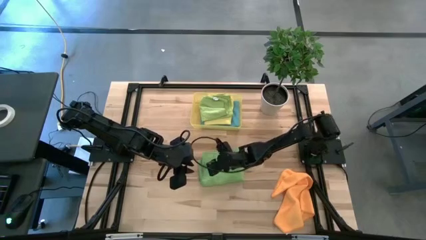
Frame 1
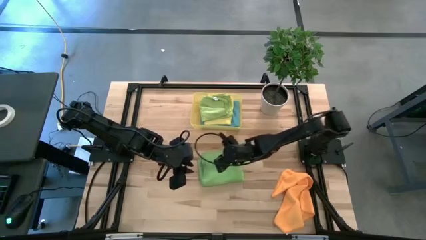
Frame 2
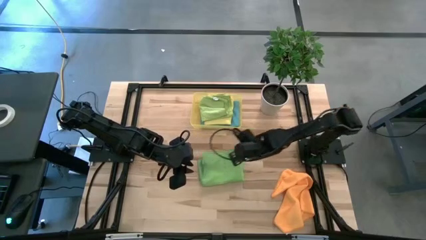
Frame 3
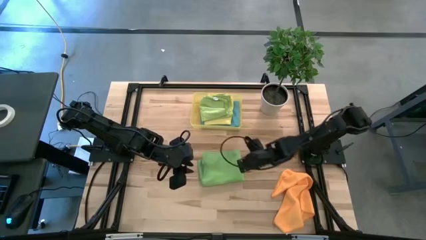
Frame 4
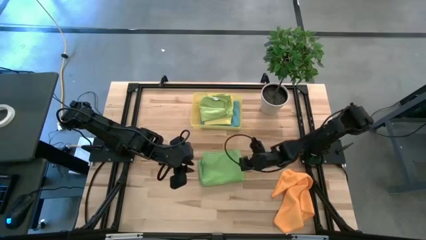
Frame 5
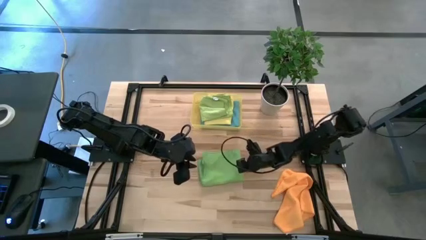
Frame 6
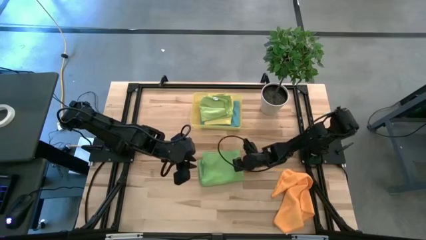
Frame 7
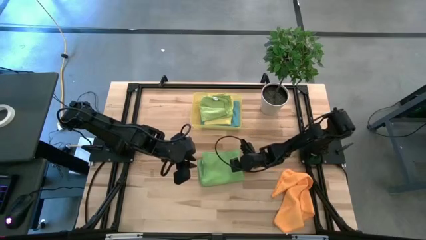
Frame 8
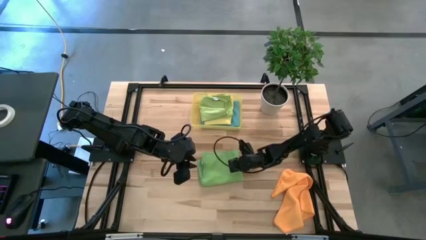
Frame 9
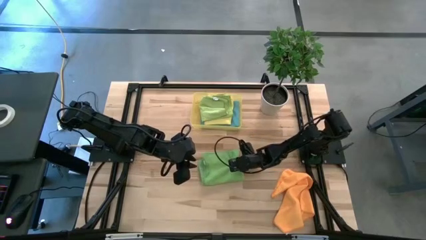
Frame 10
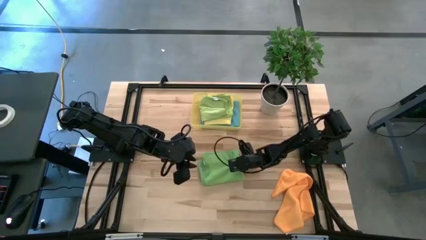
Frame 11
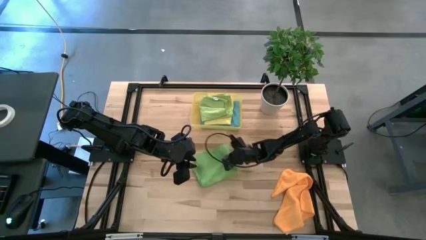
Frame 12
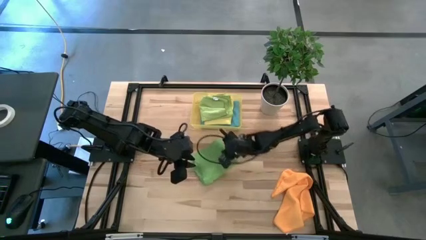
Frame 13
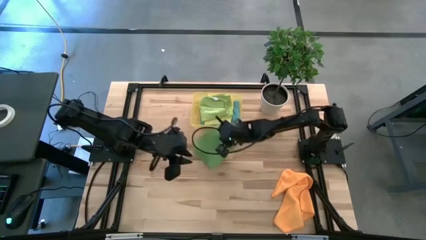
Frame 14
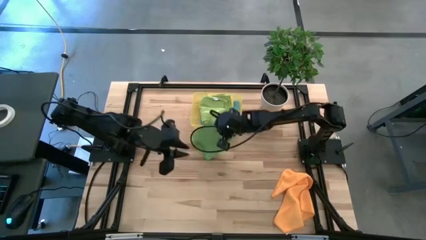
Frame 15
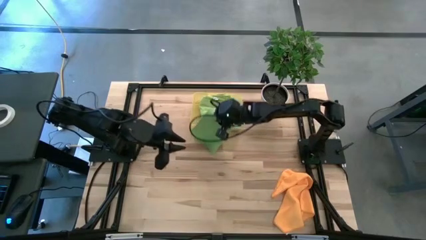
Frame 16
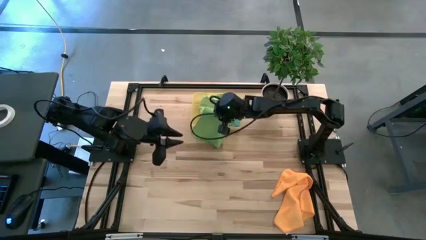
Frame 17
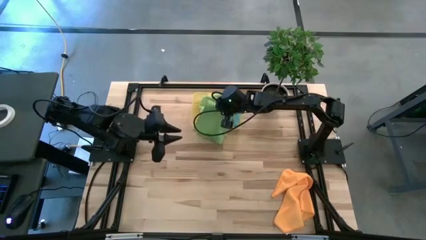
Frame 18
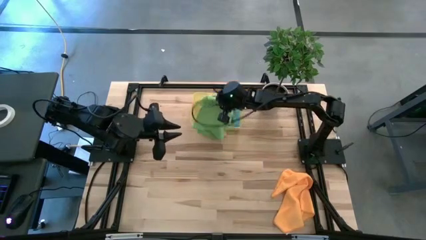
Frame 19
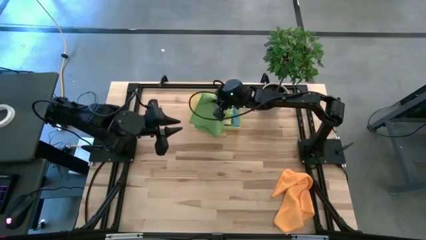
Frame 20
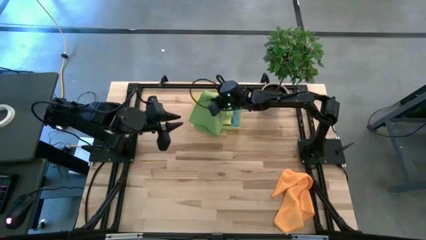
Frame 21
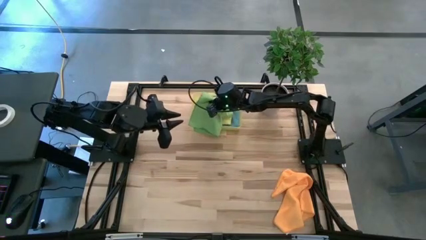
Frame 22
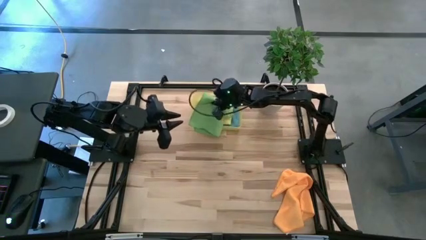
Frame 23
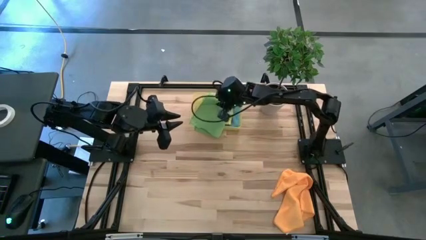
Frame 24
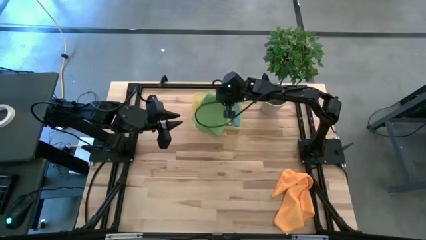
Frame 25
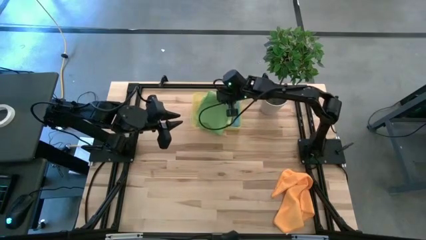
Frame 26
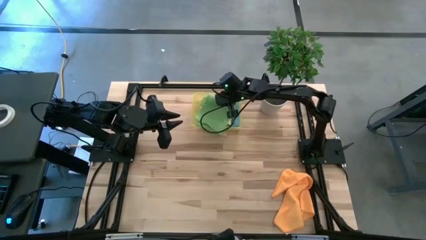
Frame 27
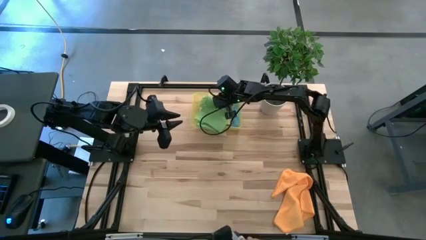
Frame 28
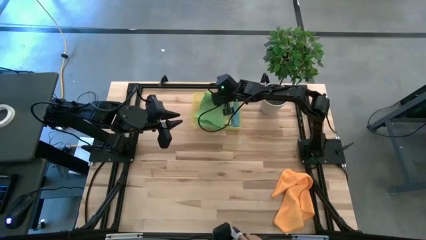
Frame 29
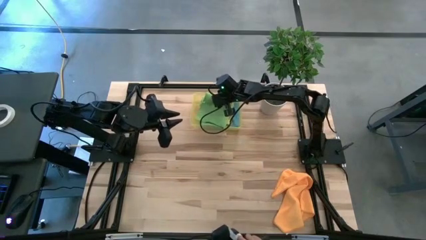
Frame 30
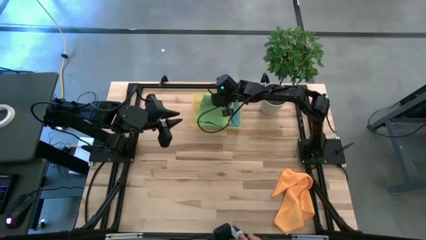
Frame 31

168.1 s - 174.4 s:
Task: Fold microfiber towels
Put the folded green microfiber cloth into the yellow bin

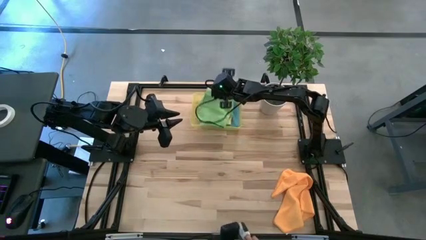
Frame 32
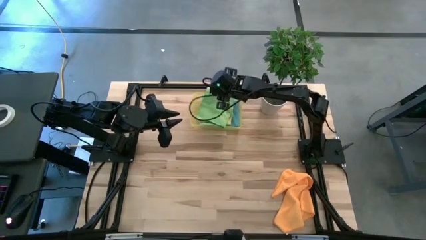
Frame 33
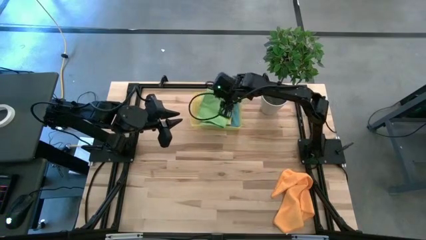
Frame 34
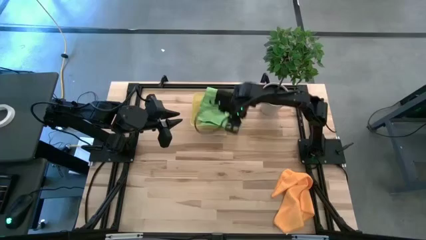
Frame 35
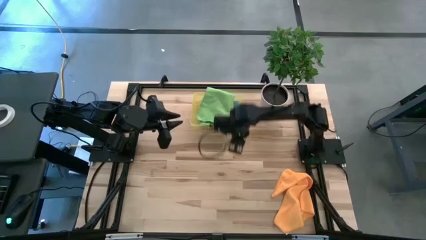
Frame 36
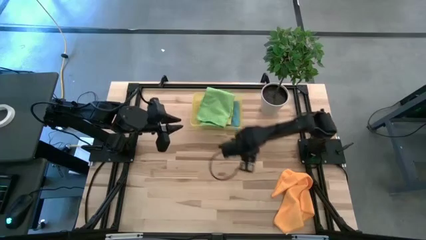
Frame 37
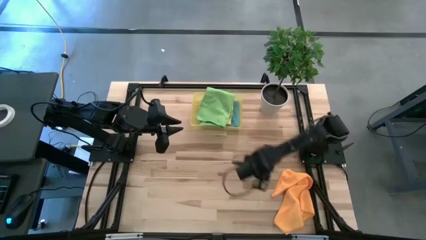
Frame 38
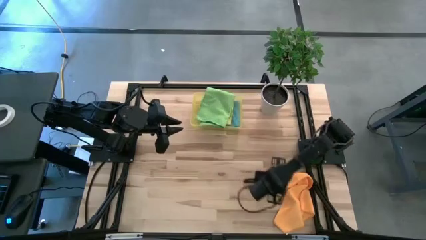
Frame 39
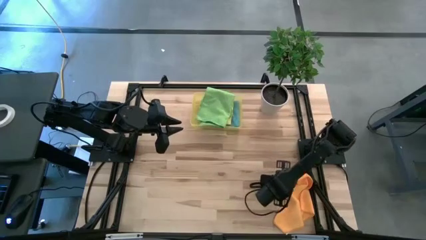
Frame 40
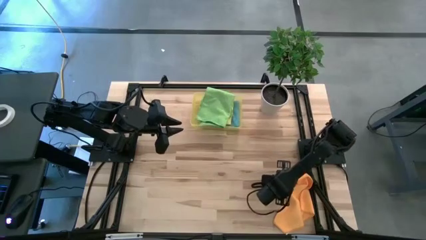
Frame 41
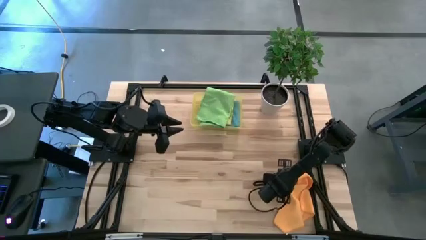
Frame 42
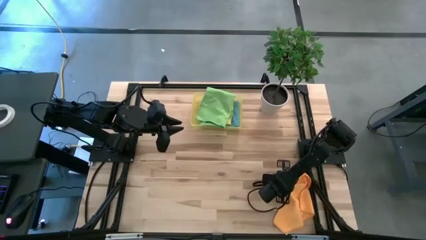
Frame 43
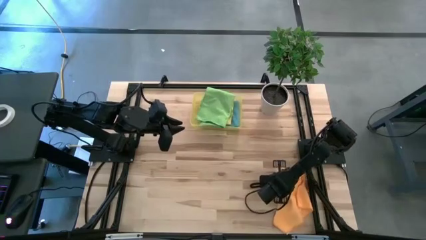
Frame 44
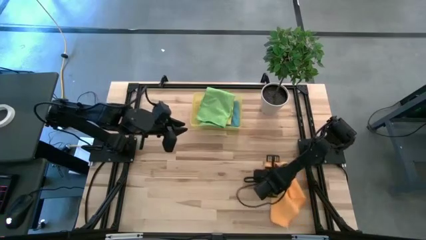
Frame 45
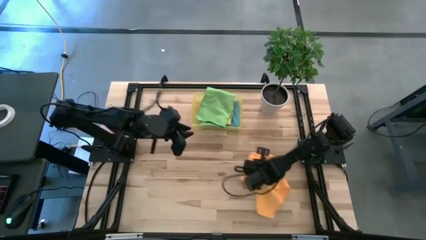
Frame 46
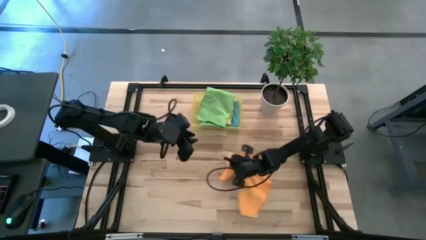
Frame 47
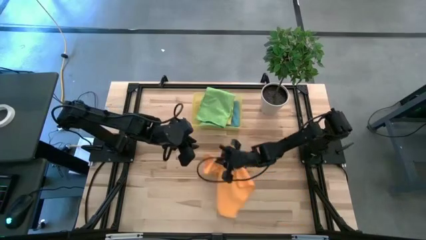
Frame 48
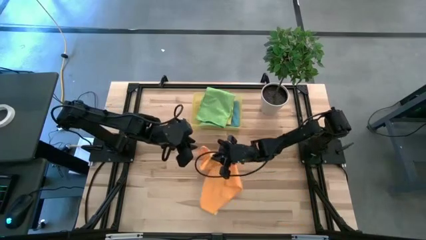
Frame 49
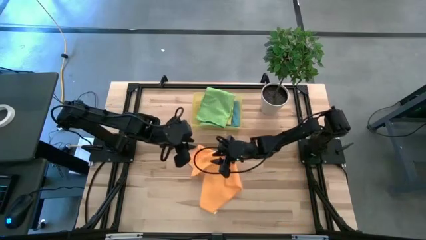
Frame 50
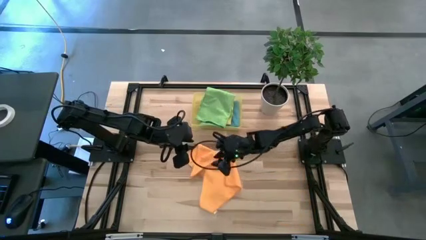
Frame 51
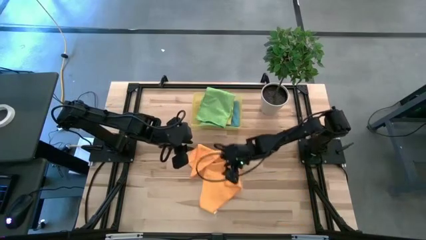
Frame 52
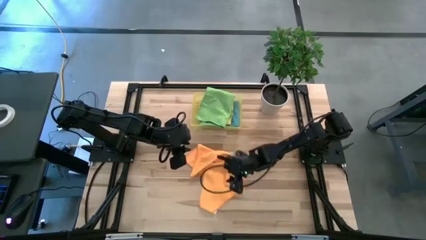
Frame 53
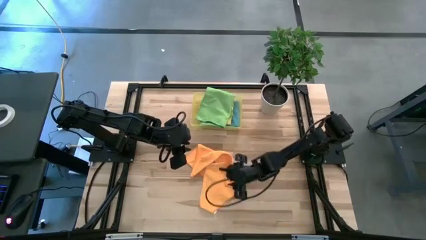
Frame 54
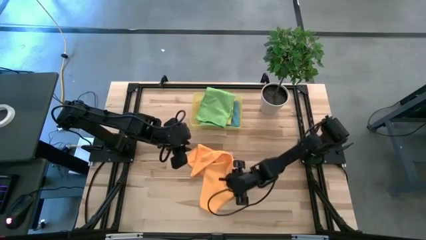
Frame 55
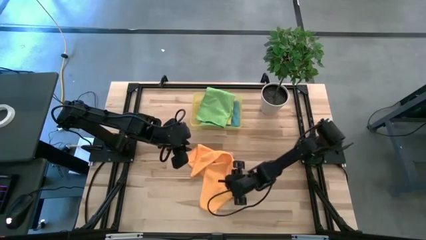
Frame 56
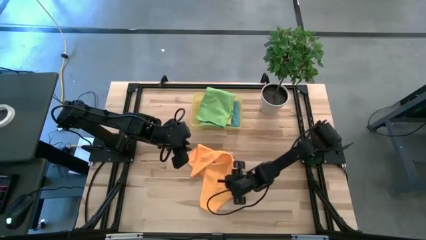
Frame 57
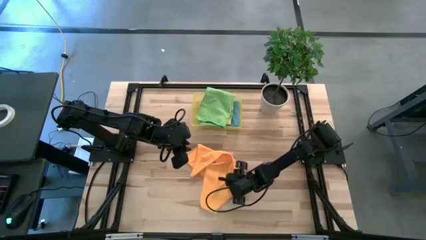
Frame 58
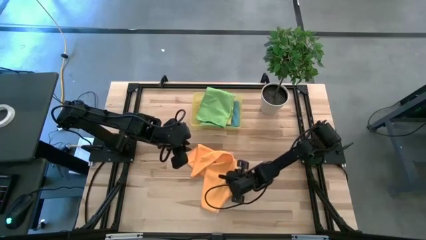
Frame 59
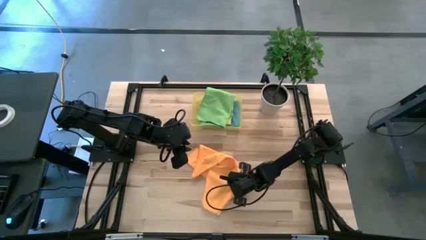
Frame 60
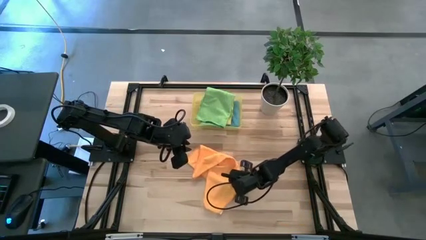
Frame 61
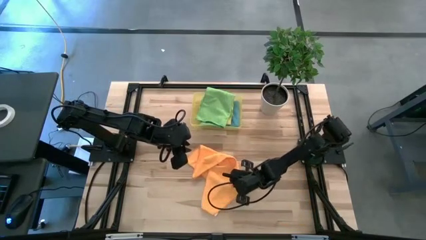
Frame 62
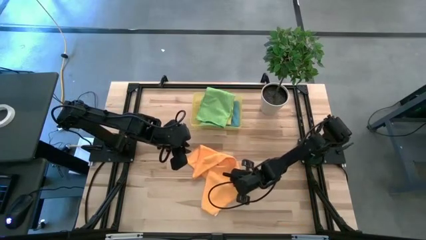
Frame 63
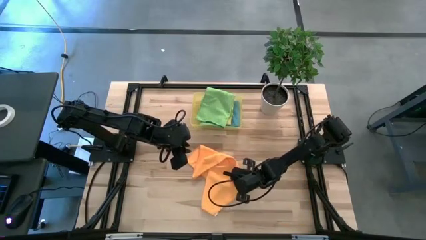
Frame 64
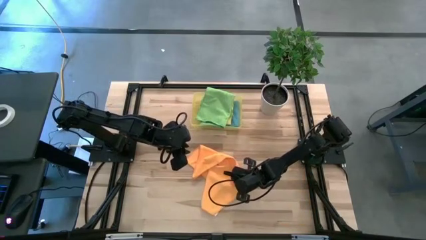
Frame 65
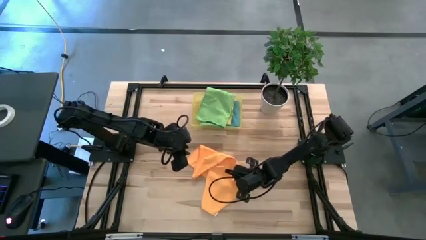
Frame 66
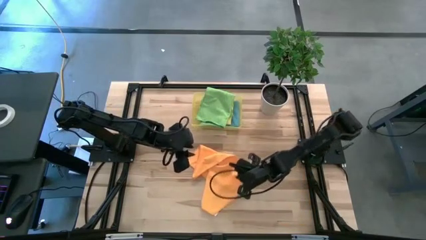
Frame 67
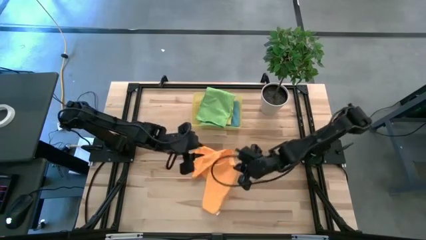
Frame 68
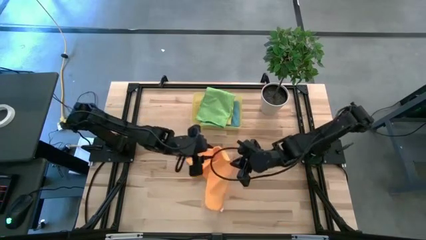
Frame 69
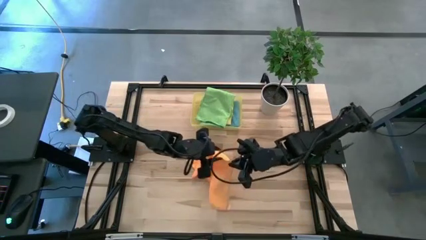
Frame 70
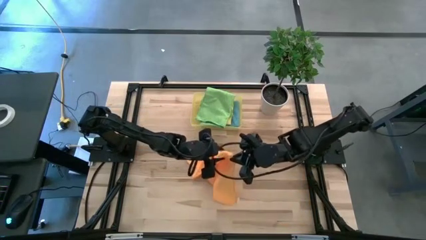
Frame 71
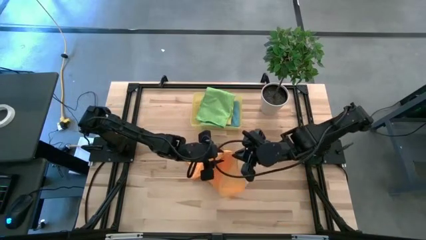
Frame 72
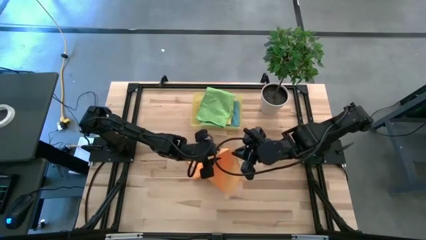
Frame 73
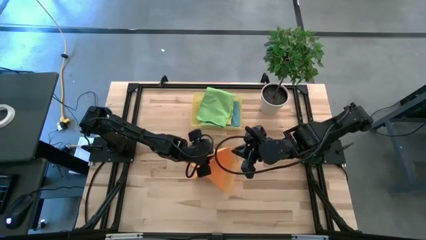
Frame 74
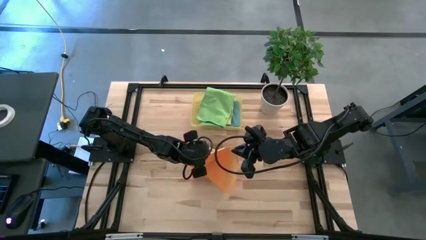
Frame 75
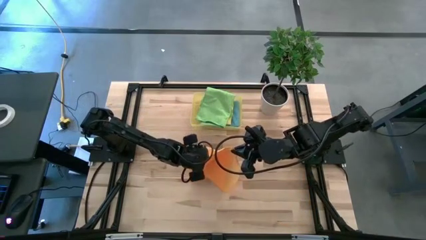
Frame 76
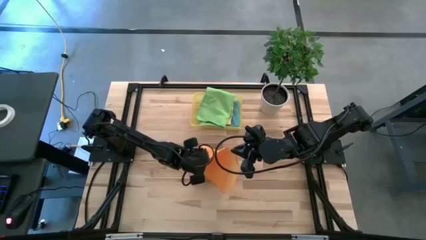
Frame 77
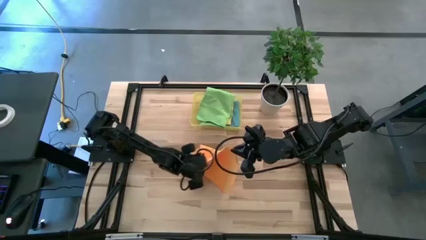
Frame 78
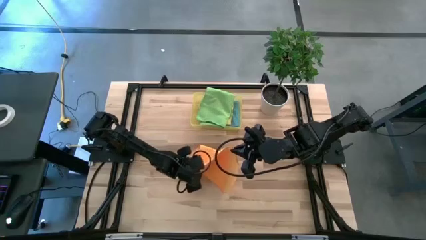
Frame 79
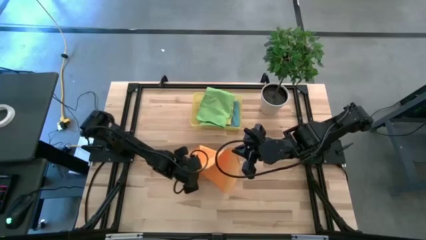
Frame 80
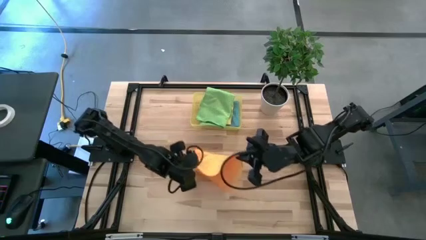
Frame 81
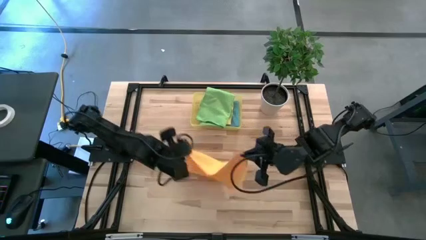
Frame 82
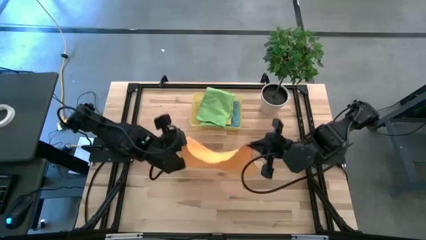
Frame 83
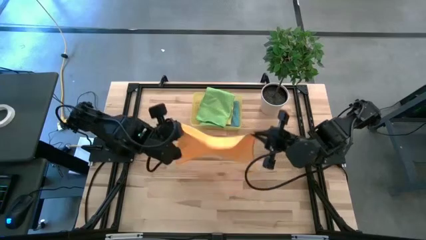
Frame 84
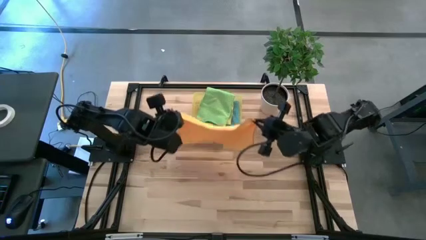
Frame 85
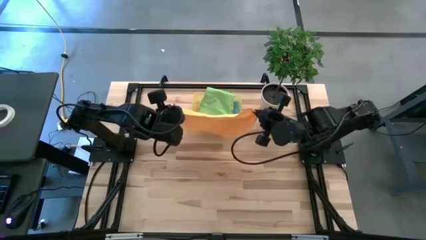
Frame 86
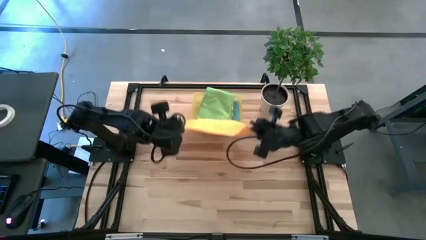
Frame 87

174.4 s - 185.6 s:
Fold the orange microfiber cloth
